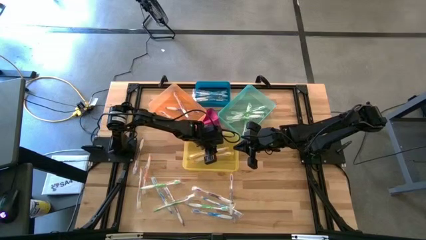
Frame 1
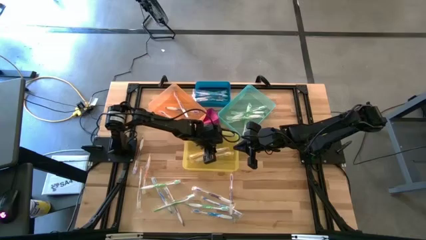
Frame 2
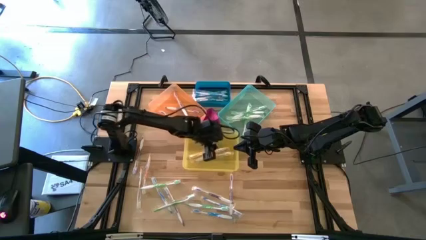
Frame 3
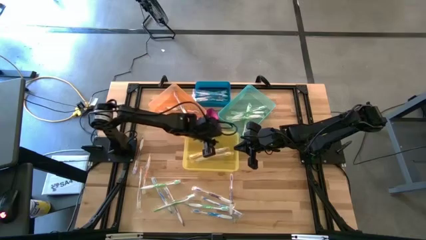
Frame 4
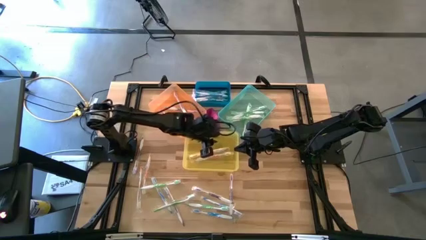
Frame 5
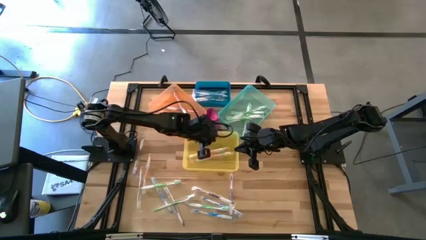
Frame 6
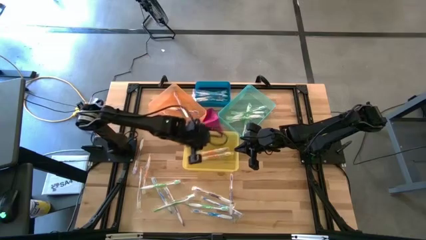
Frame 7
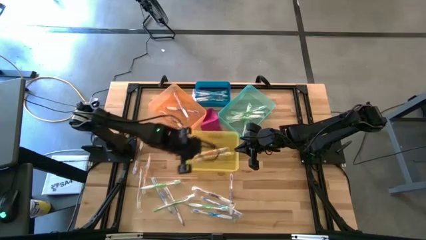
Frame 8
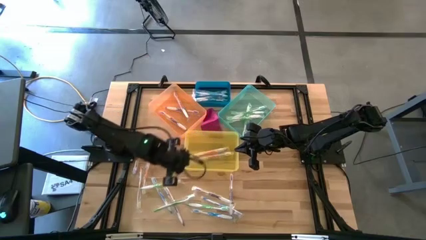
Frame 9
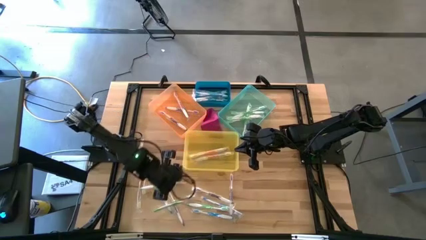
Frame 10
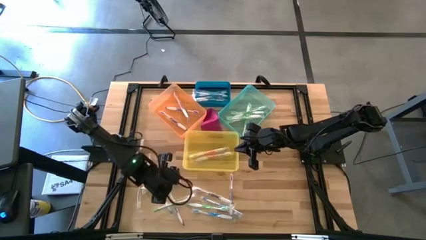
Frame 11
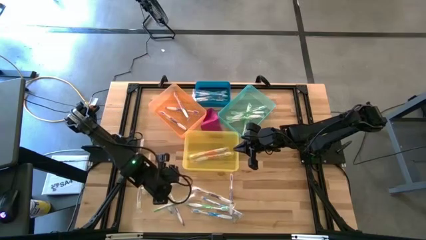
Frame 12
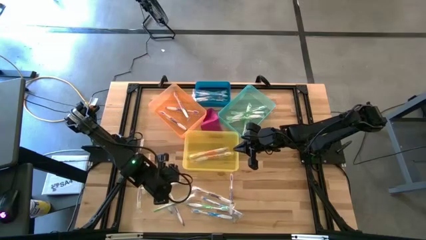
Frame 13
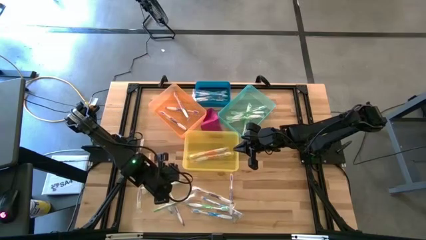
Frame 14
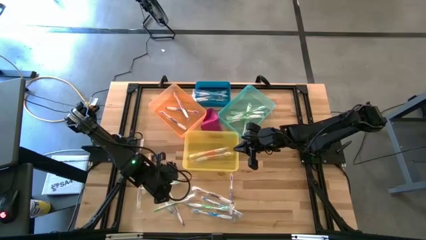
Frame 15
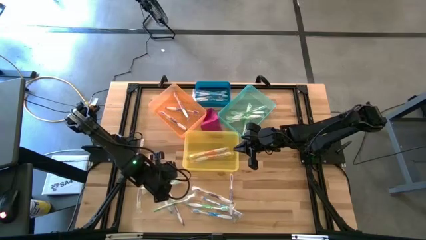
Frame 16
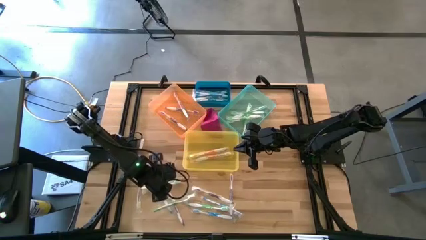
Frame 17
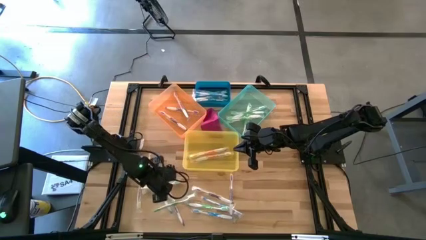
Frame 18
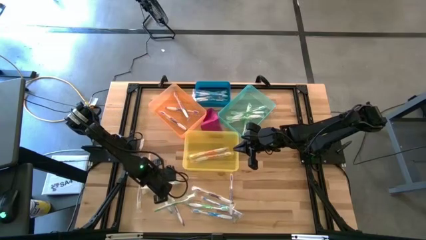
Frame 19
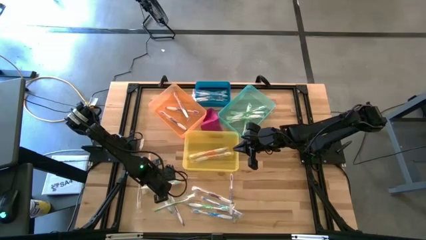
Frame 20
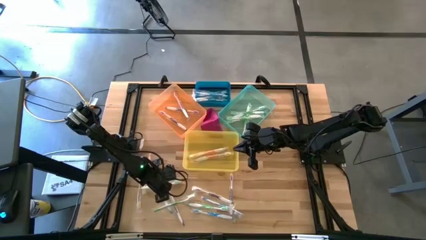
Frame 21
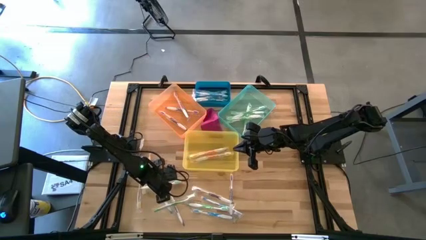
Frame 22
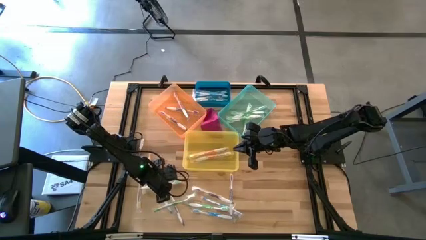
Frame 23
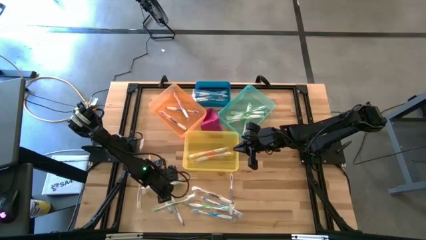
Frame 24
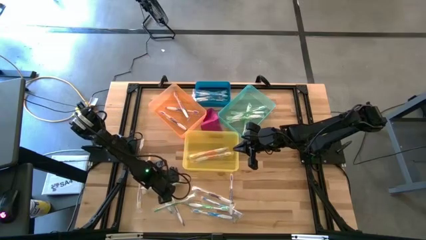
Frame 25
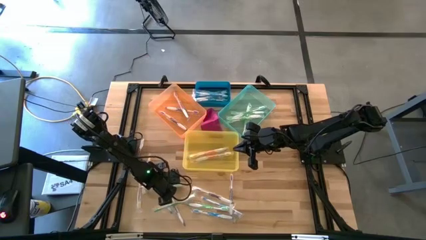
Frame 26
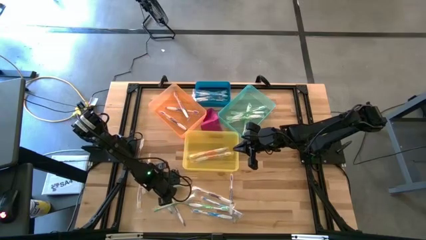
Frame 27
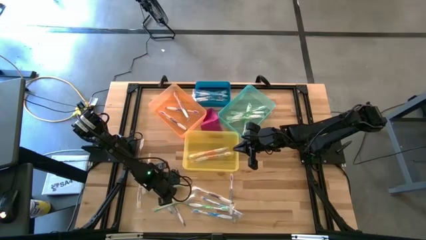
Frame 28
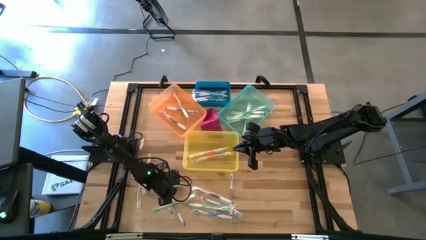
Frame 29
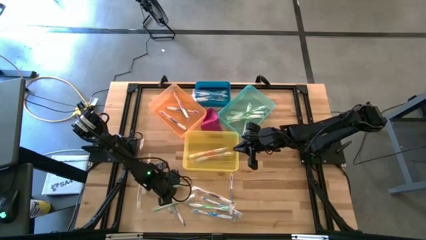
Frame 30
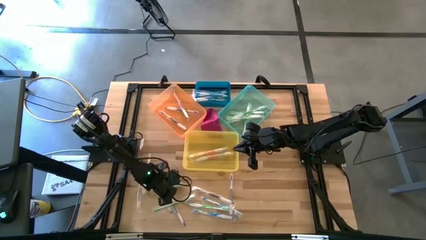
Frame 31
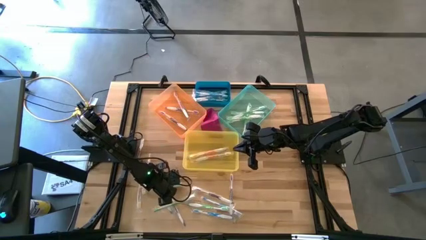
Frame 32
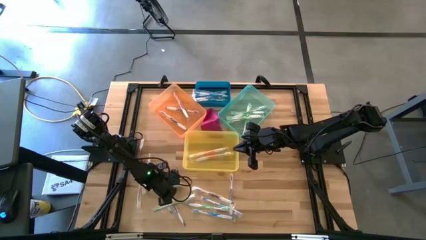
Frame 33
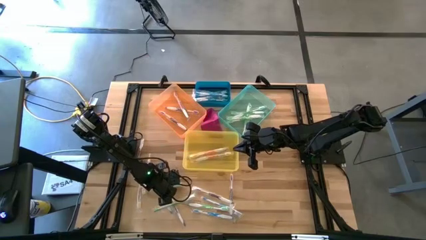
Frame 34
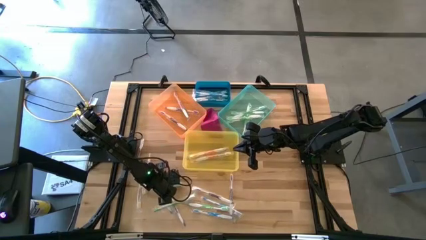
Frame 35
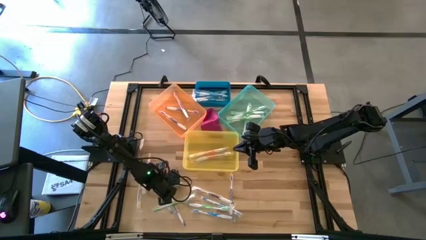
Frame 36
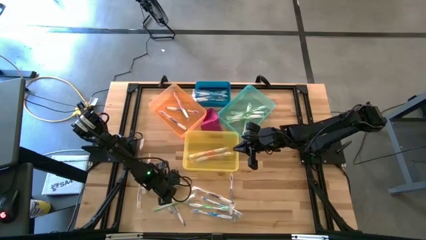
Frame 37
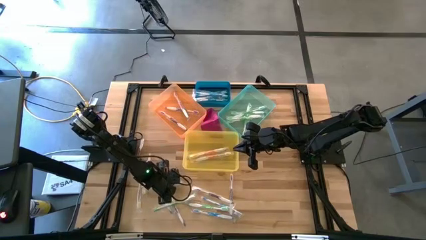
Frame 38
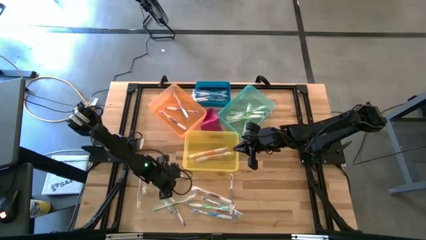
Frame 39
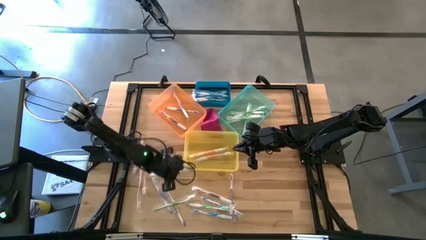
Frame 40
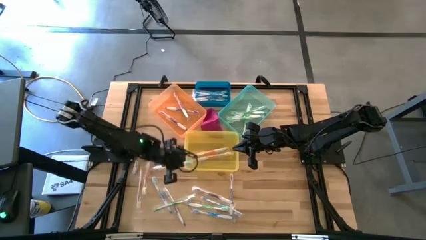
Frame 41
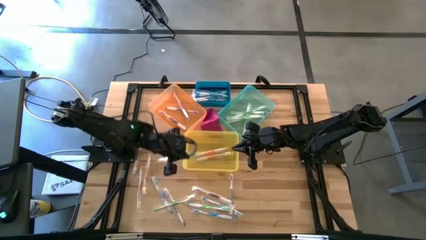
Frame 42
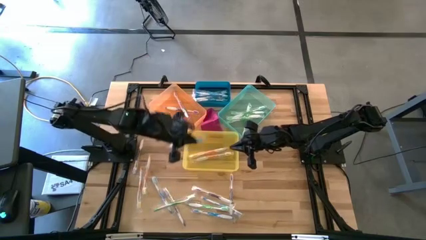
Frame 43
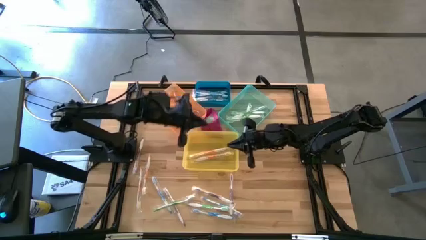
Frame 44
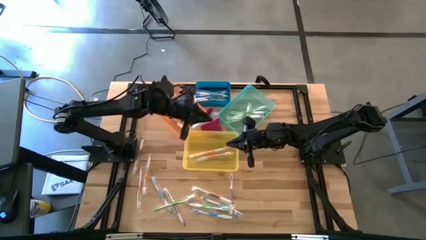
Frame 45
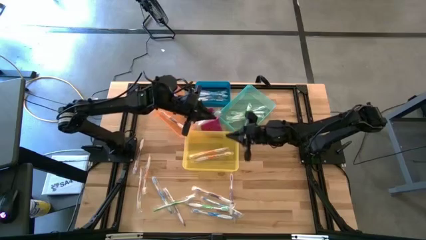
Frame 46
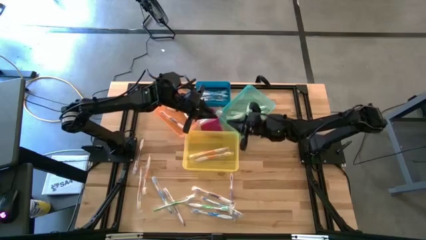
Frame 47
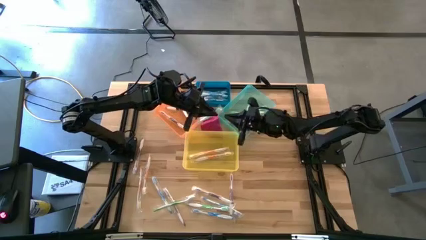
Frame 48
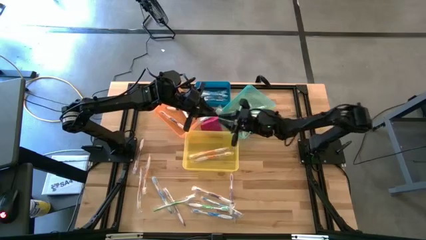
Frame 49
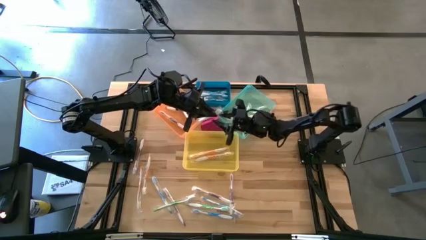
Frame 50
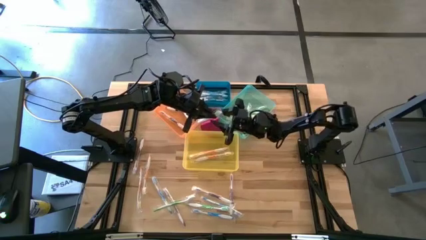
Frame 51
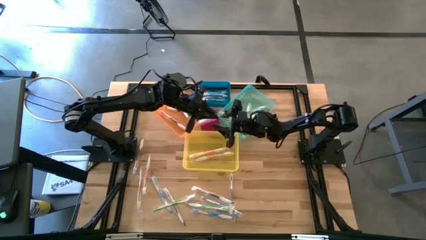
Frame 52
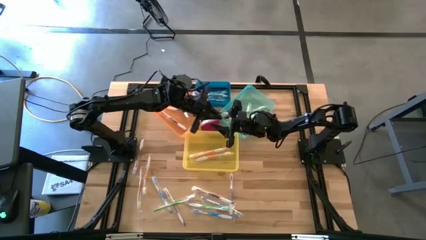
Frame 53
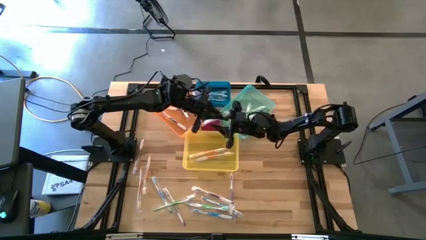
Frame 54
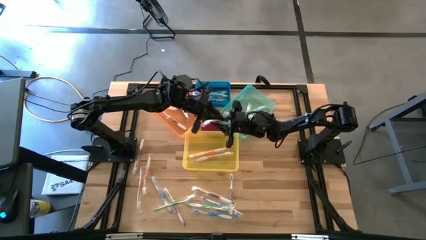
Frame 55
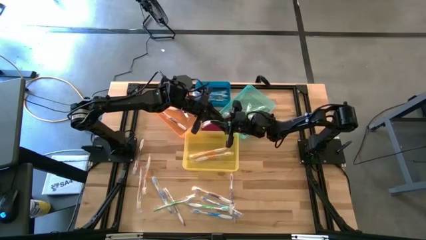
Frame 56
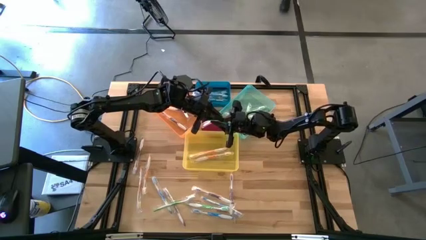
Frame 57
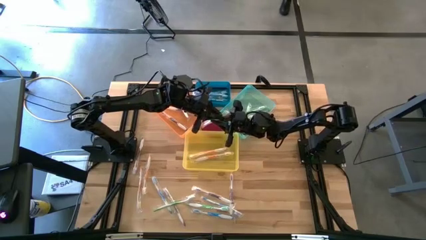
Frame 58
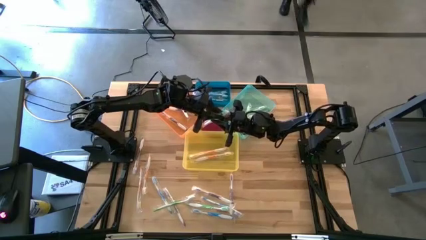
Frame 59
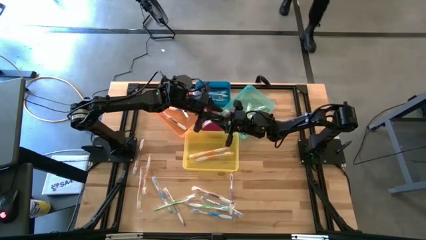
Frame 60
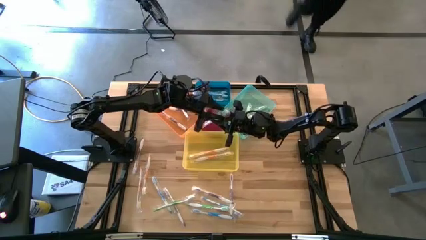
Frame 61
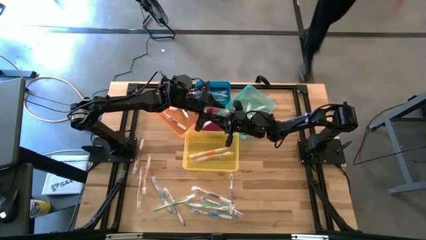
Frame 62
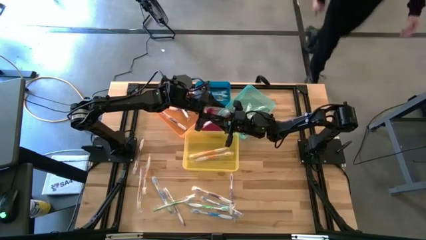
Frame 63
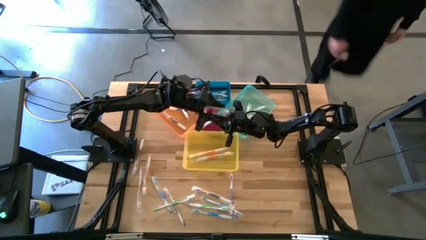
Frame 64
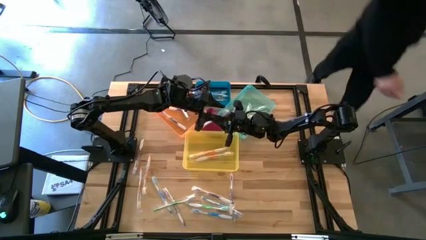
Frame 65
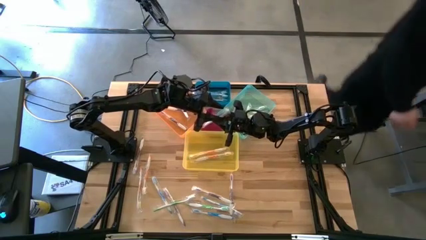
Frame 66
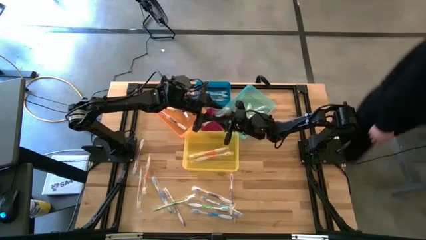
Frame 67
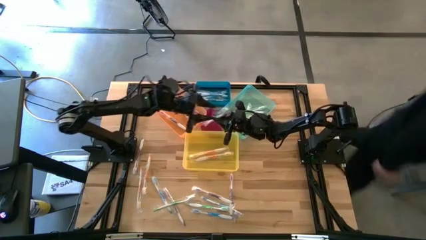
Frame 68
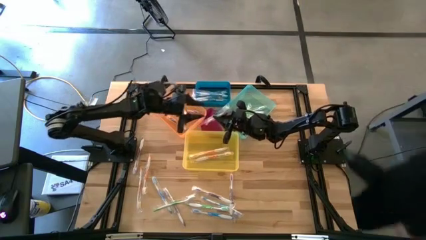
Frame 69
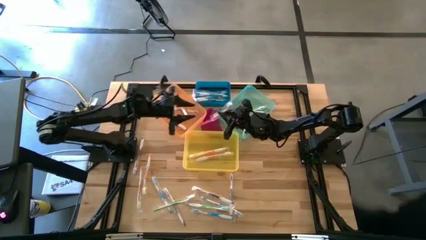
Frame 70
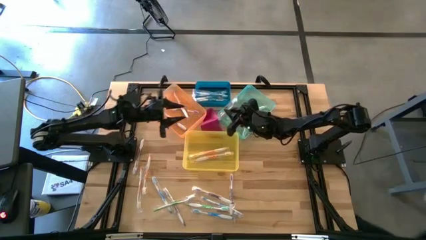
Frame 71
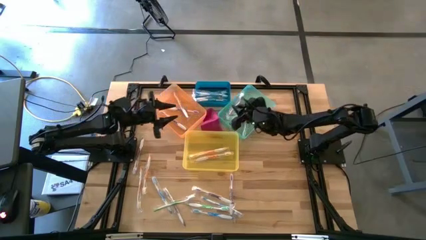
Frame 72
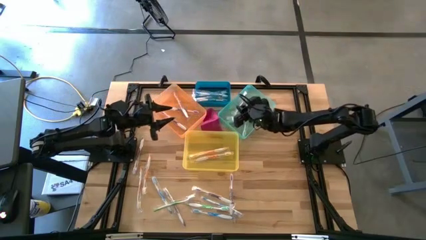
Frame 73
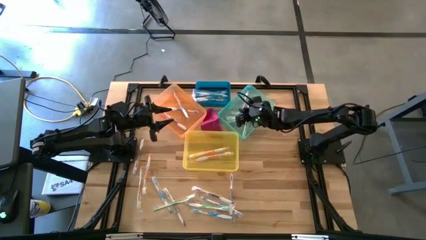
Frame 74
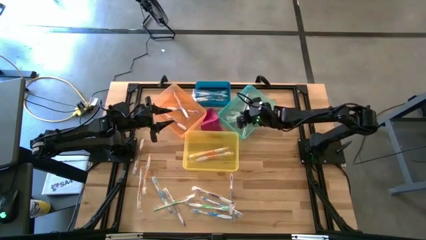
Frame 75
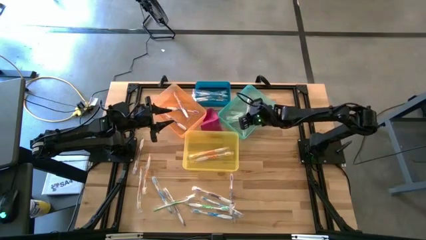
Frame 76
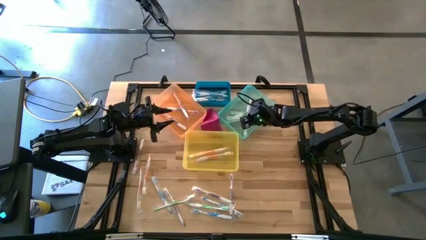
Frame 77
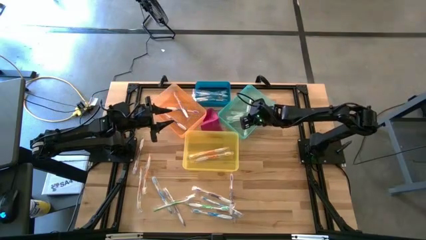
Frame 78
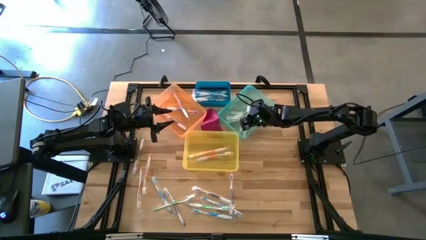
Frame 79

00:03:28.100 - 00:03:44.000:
Task: Pick & Place Toothbrushes
Put the green toothbrush into the green bin
